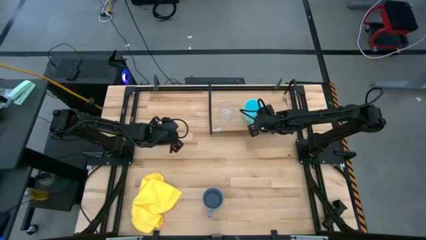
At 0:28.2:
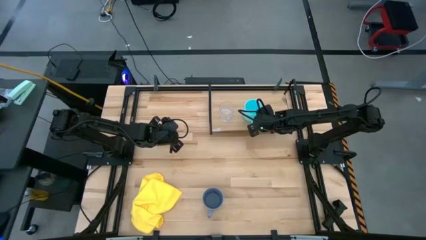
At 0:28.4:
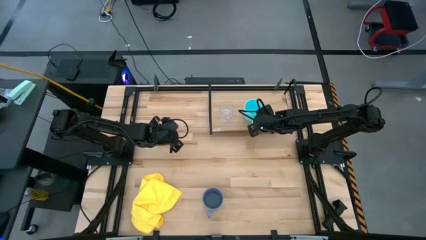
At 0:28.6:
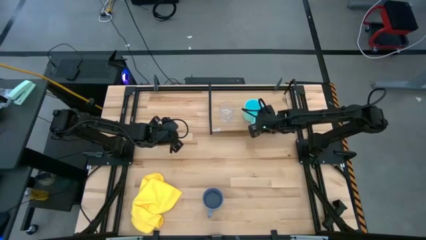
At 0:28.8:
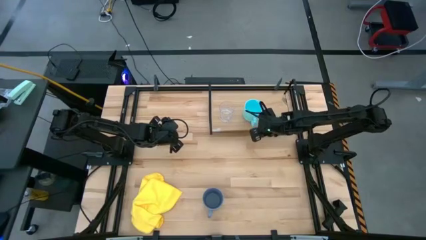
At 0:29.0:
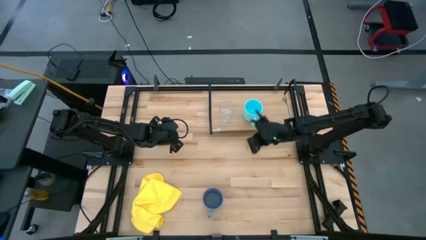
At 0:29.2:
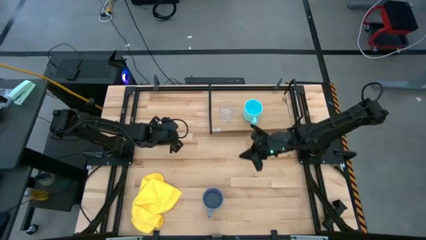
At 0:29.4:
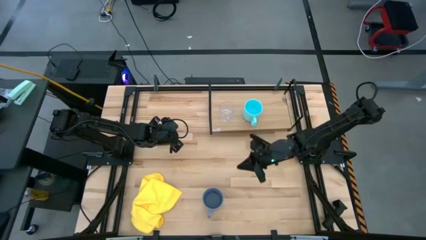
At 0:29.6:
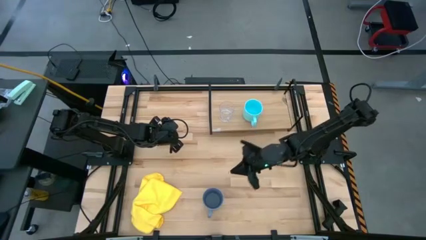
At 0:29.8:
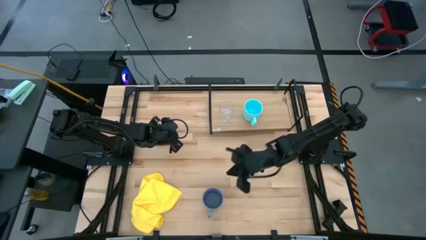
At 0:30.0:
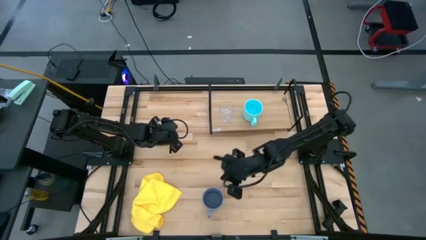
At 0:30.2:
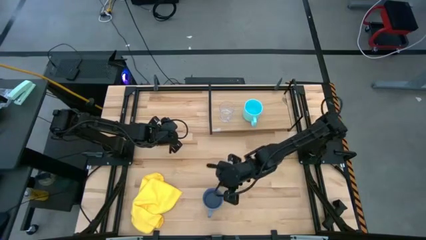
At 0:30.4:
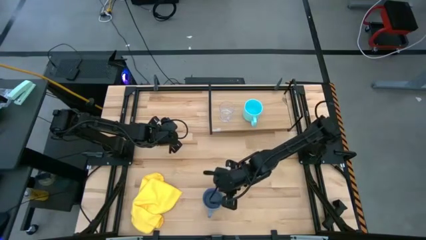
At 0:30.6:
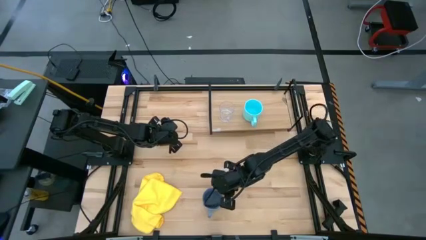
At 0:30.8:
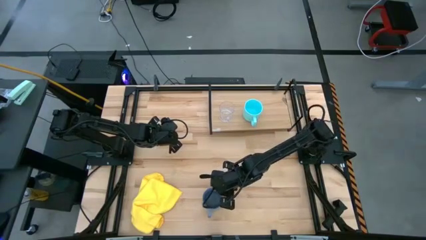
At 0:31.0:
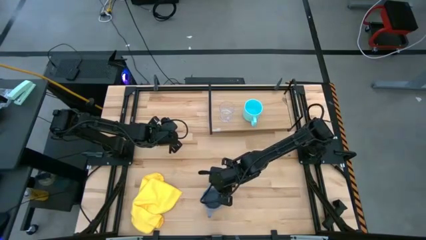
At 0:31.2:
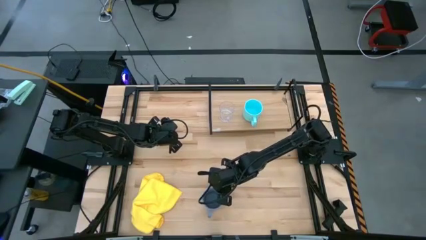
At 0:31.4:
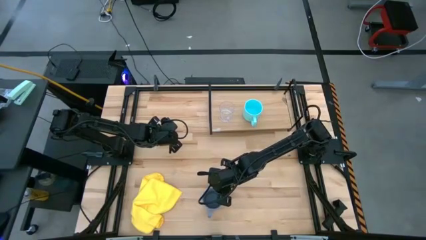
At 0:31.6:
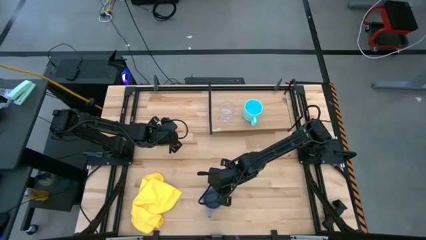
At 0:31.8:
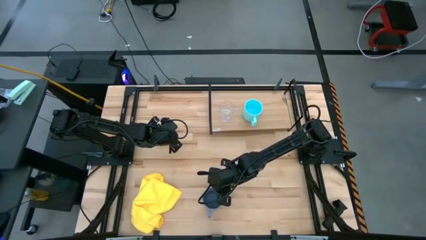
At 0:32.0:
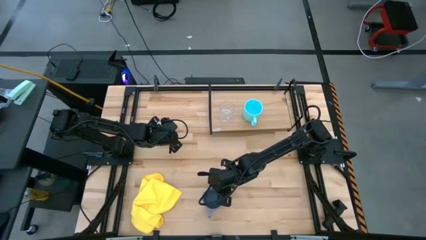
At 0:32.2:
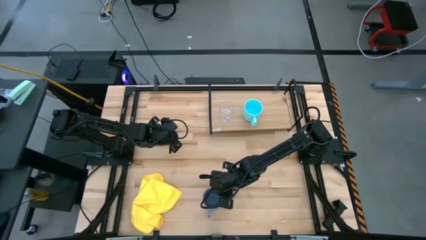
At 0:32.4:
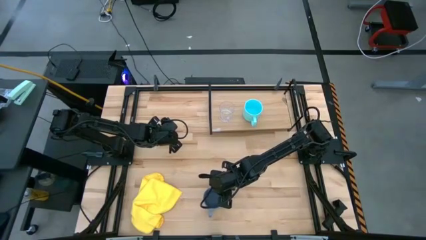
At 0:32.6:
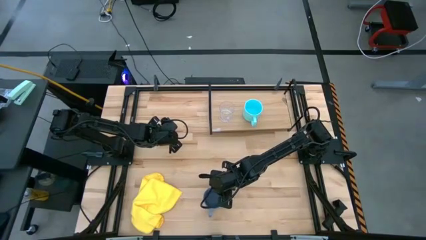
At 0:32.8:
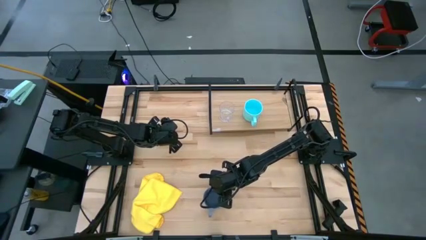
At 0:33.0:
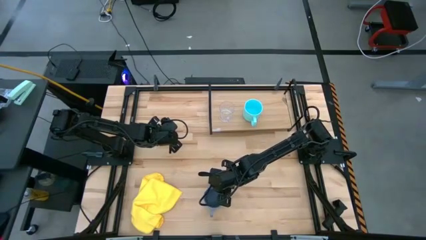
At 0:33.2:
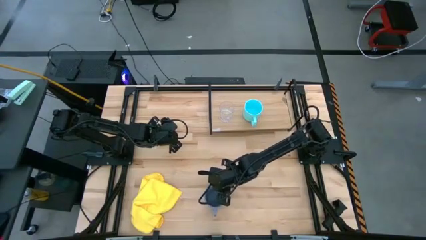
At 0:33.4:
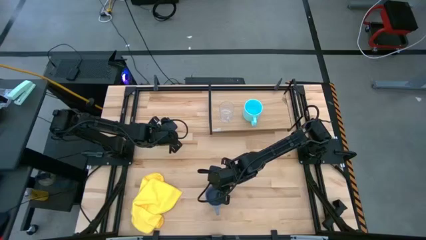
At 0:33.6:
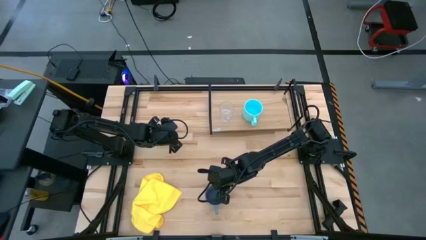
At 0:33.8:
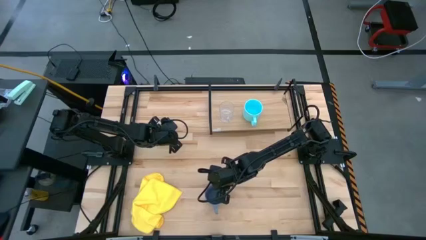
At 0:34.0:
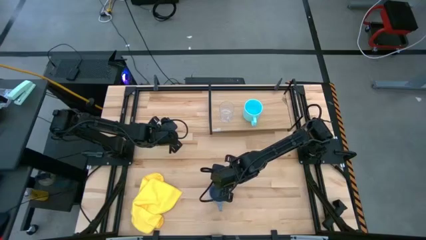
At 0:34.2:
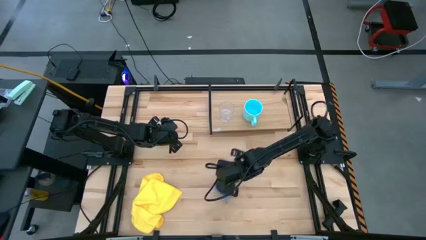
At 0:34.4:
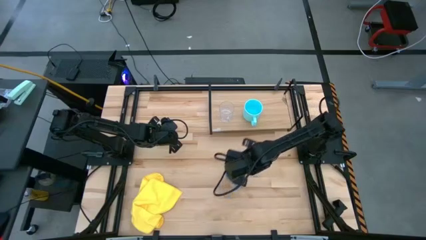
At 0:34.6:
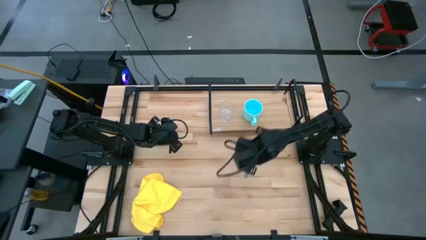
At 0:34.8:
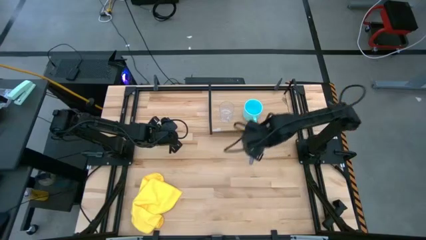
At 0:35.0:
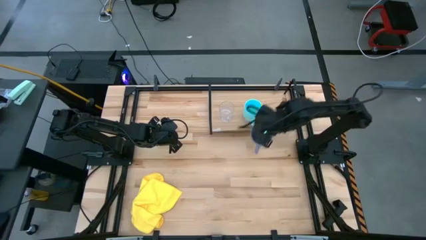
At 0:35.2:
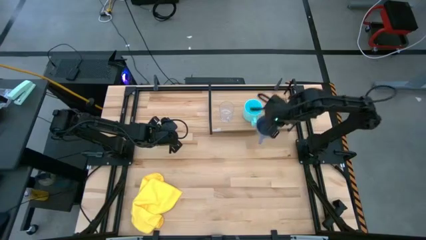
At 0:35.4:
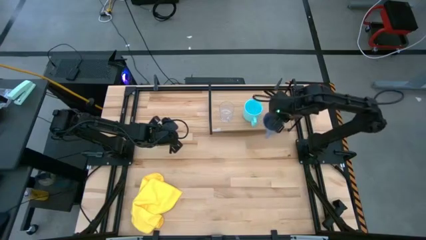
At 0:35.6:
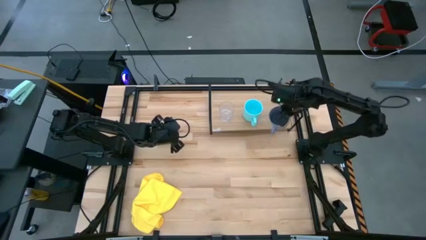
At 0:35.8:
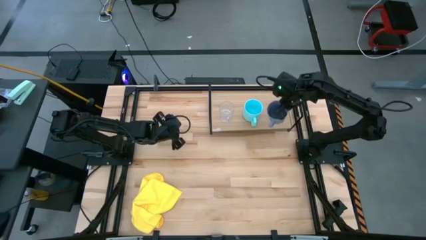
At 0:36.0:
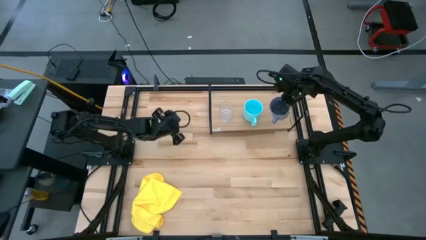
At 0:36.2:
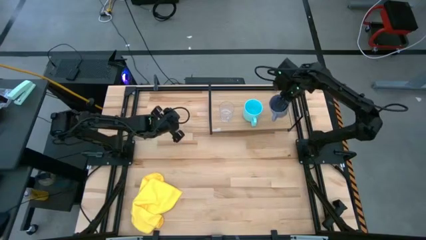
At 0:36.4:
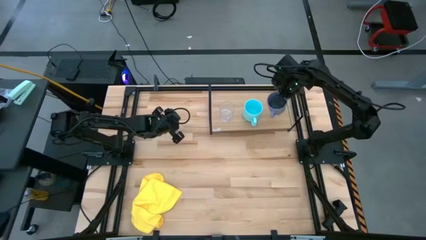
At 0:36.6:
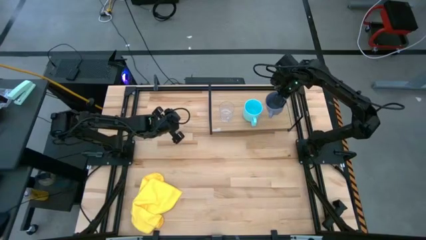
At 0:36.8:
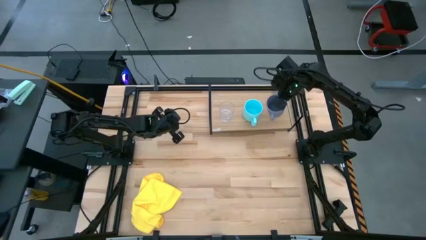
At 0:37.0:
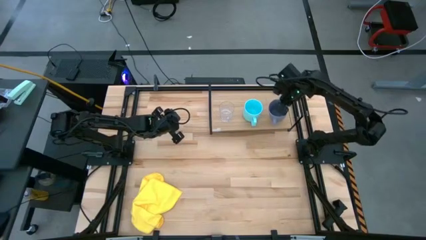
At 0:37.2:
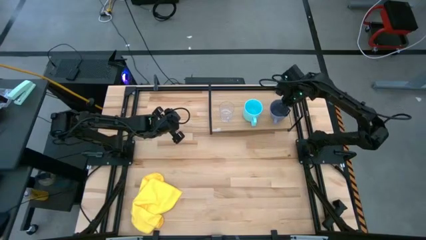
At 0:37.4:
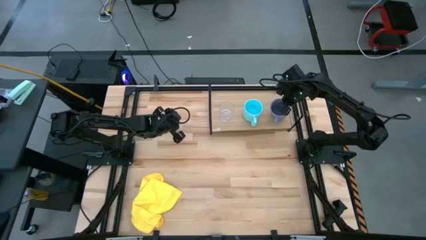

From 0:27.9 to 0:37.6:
Task: Stack small to large cups/mugs on shelf
Put the blue mug on the shelf

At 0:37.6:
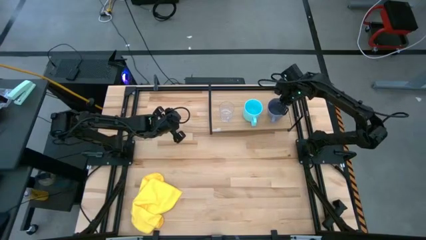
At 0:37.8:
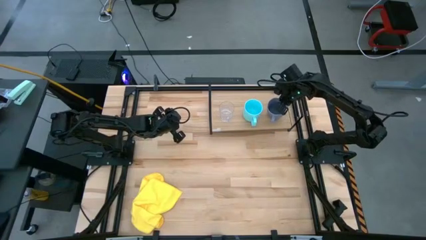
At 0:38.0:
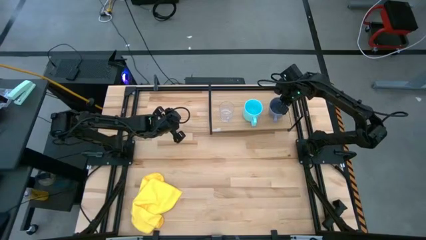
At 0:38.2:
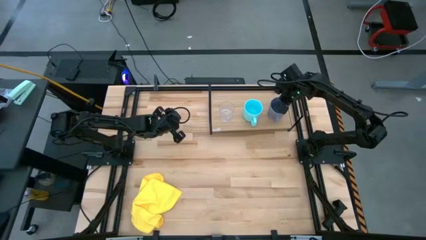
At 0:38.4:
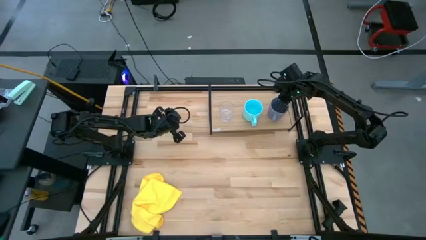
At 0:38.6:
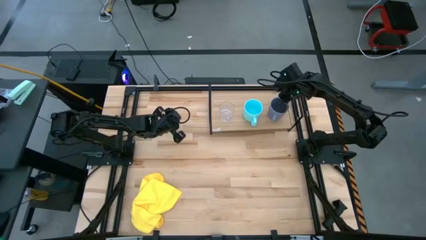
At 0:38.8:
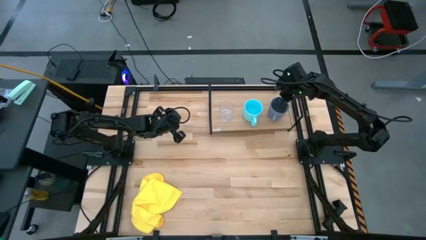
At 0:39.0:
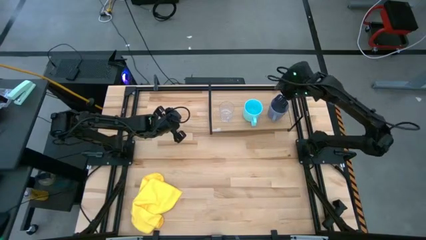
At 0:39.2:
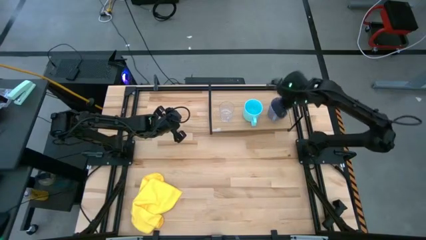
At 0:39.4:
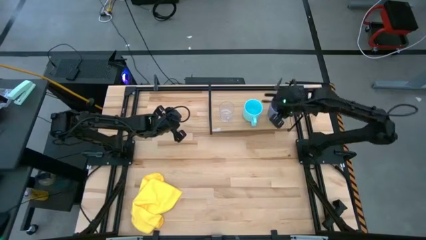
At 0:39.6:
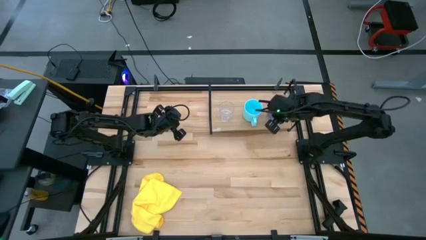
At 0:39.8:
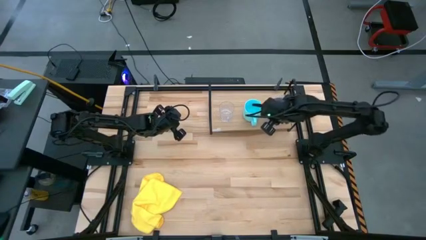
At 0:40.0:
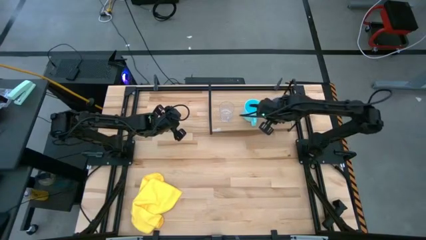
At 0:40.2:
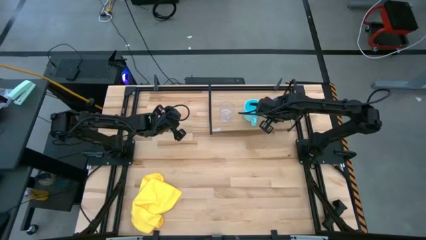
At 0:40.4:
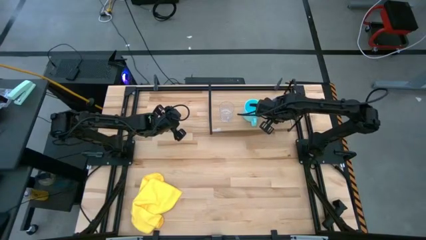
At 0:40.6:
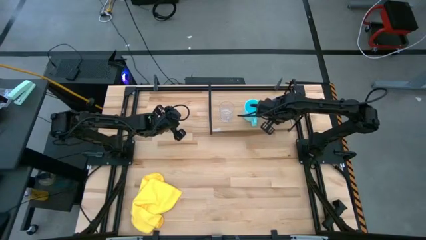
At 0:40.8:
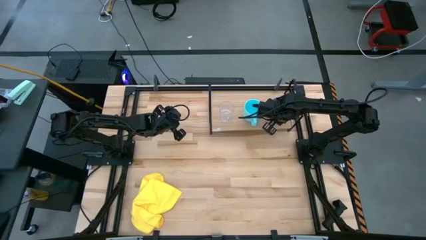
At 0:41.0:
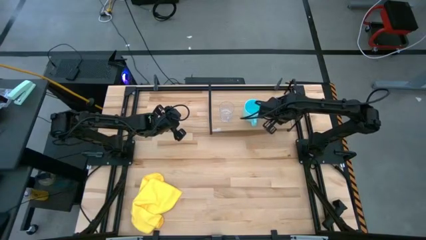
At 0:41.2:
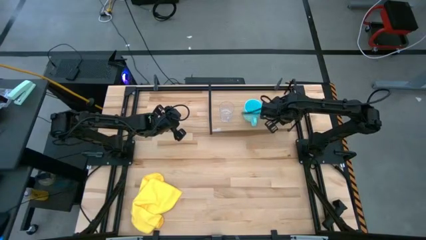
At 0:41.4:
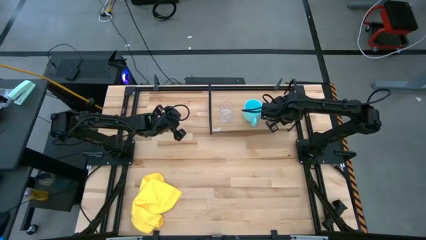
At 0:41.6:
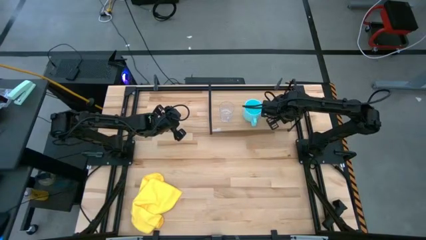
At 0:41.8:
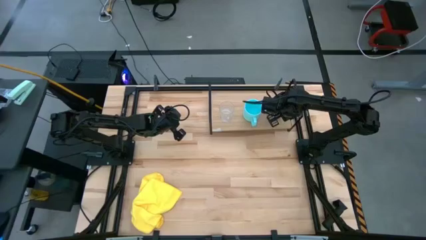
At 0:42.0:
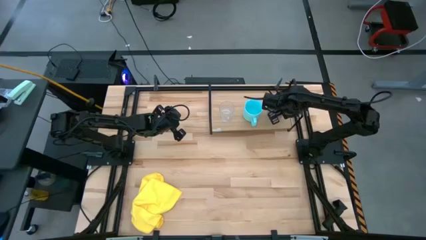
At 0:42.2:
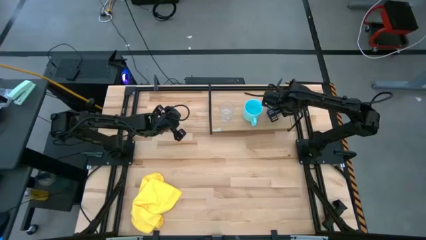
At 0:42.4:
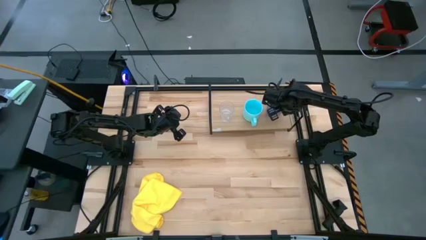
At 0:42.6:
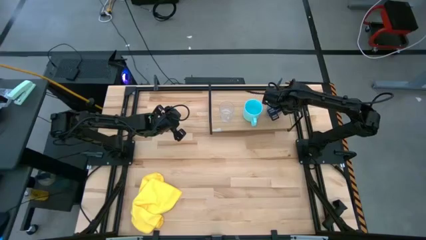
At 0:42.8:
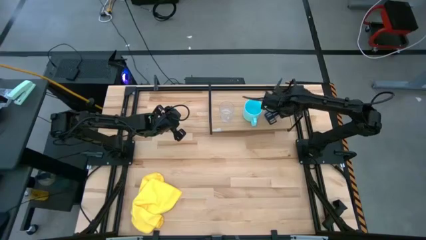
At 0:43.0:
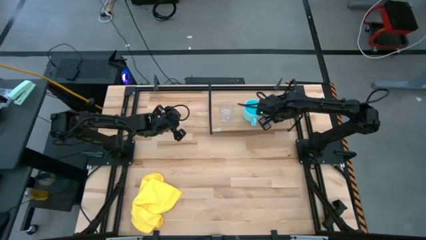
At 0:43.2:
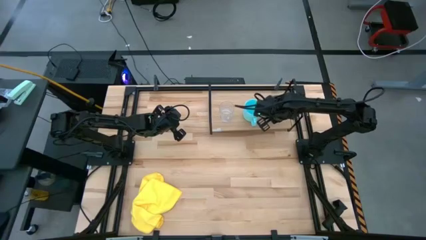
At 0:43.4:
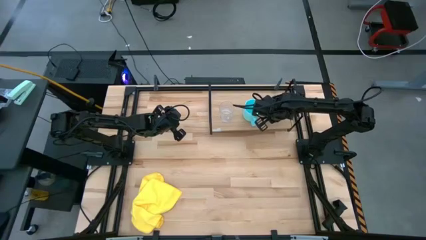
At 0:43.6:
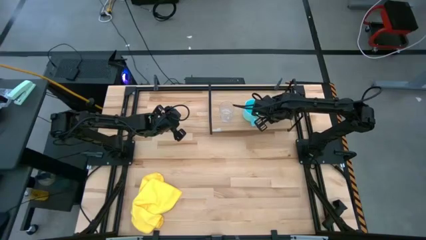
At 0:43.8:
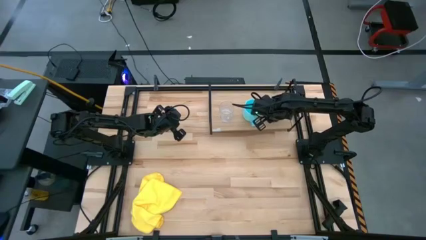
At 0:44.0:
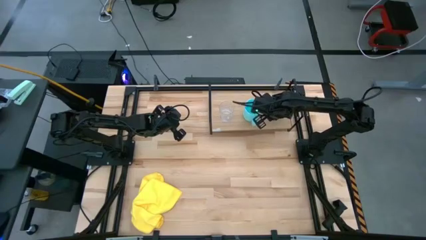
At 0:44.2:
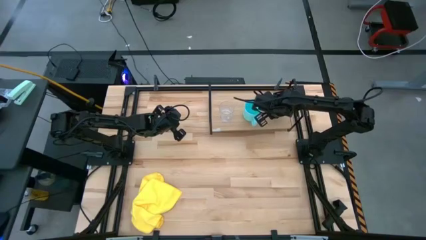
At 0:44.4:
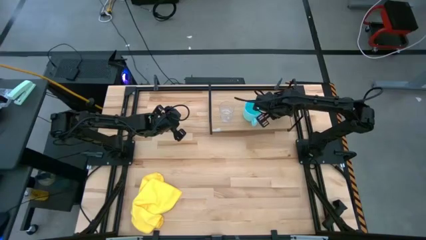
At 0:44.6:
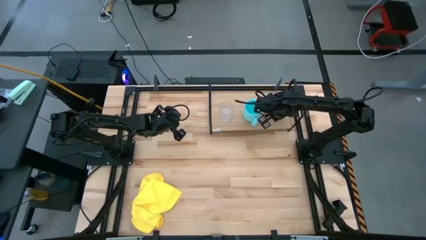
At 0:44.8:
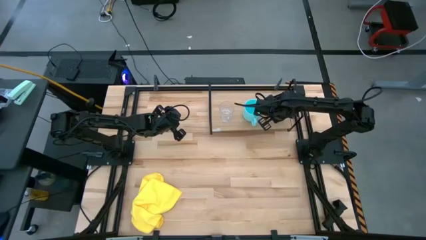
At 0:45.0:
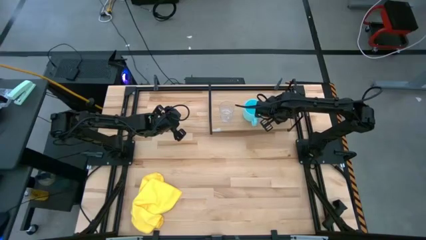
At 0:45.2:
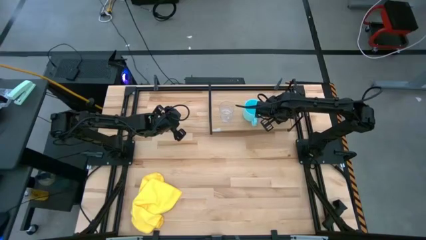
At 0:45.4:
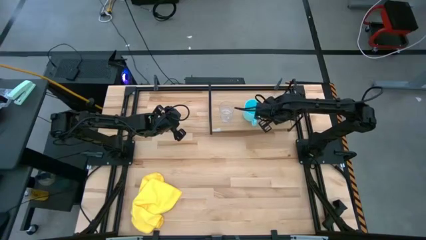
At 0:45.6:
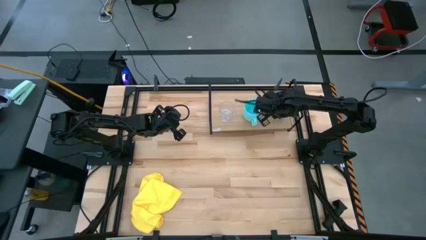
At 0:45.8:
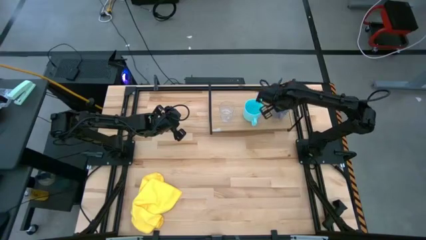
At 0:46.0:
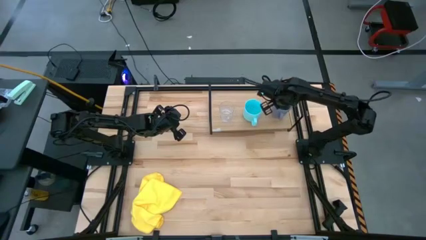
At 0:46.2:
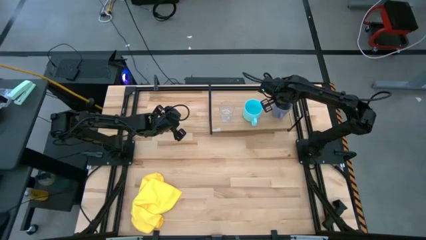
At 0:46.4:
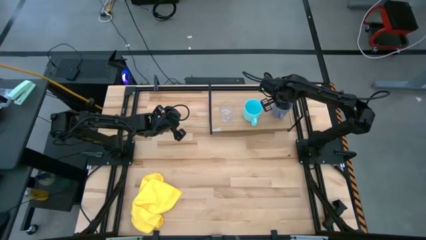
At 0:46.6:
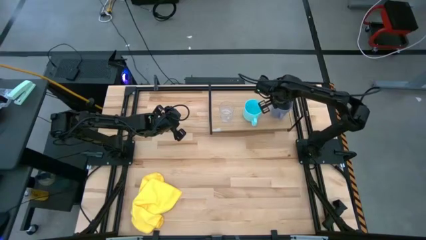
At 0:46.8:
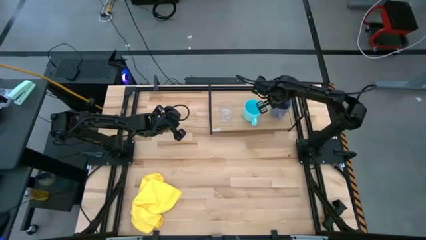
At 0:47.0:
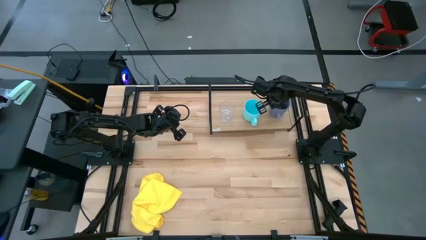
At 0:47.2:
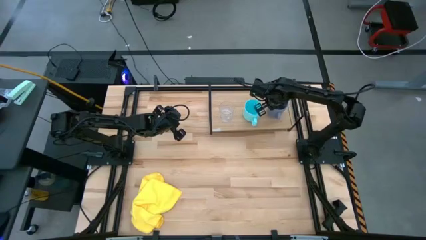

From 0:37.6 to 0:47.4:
Put the blue mug on the shelf
